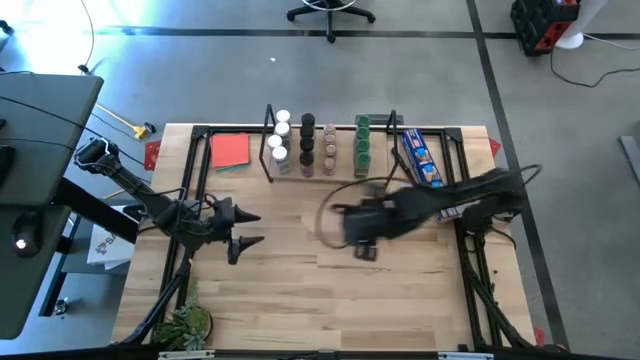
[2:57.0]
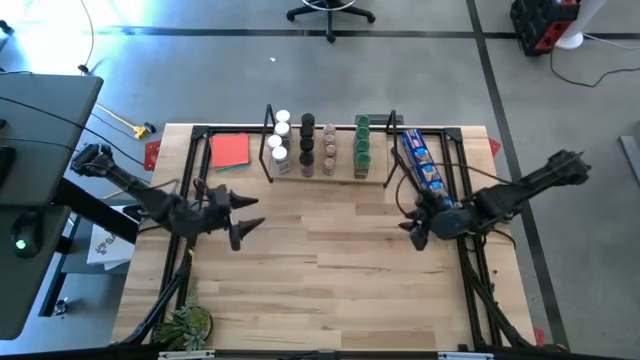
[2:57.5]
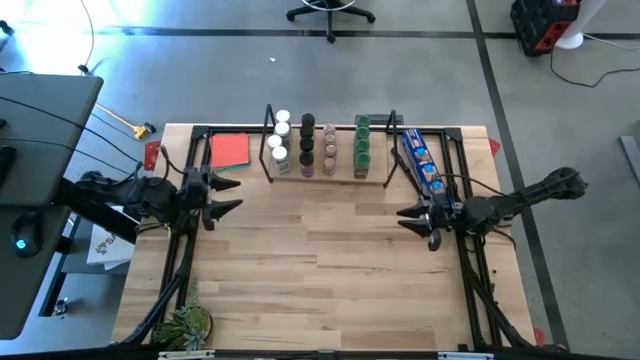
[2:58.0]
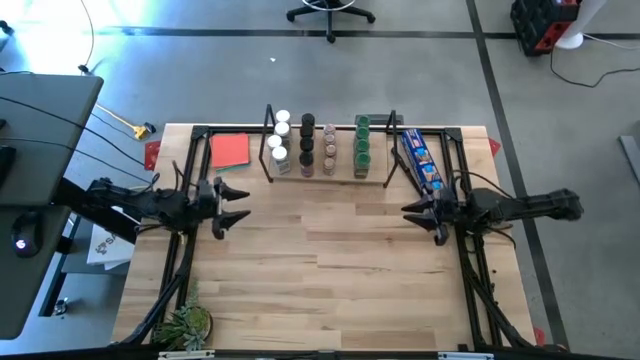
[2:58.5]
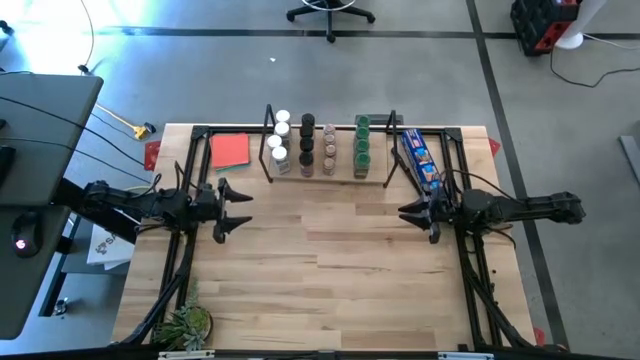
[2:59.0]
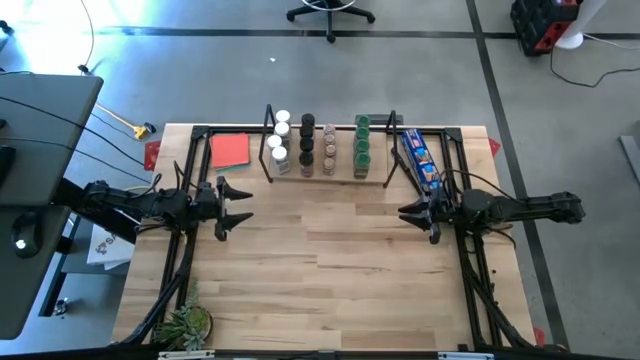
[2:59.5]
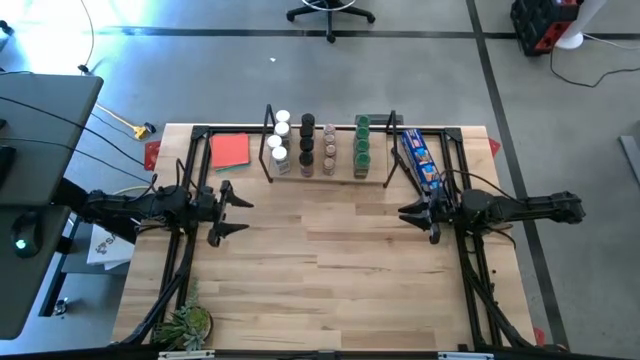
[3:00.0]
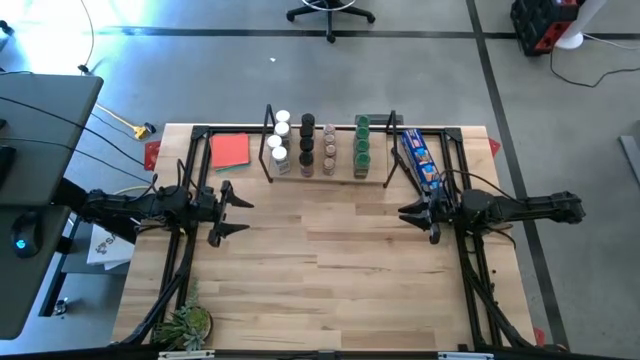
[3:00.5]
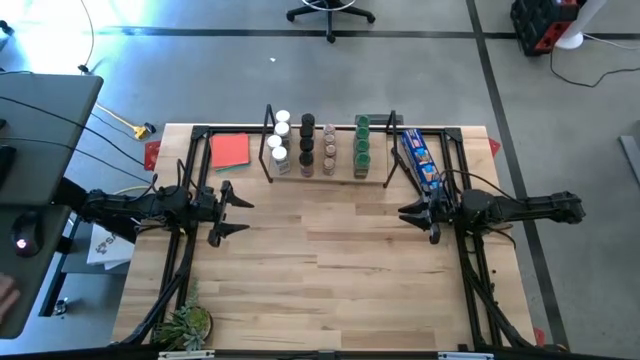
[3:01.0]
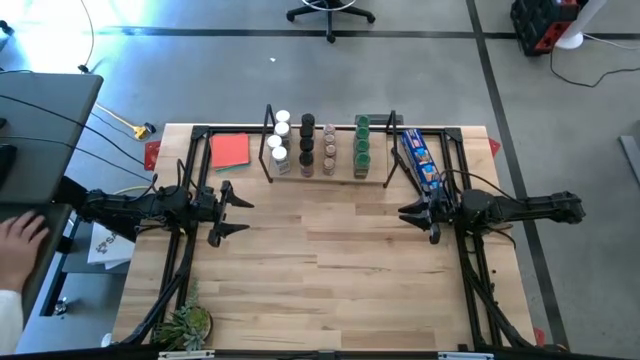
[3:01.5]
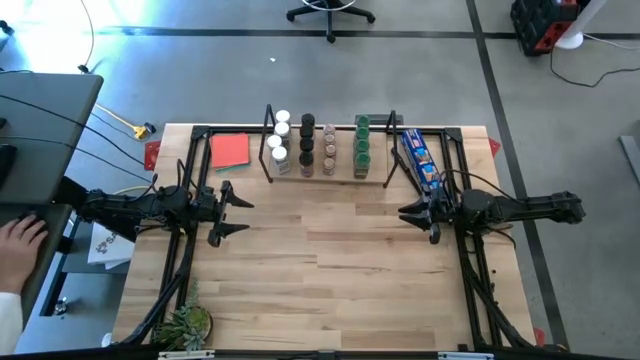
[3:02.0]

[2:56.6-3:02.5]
Task: Shelf spices
Return to Home Position

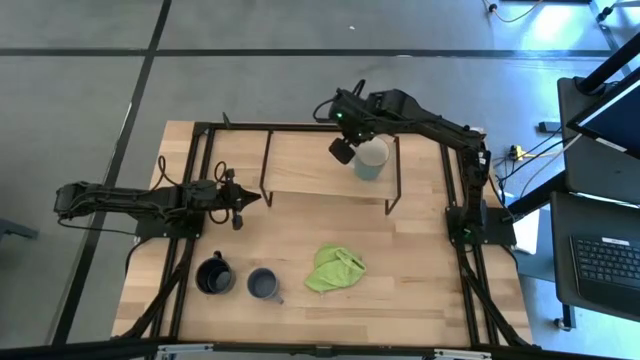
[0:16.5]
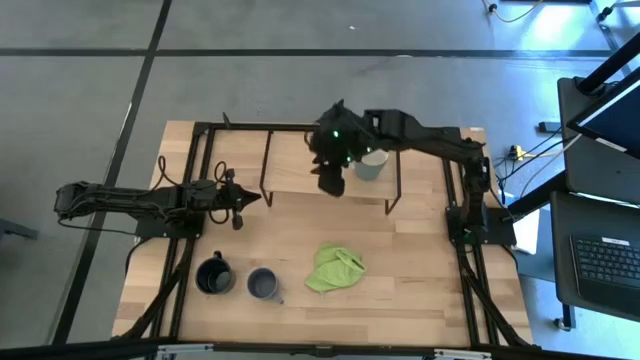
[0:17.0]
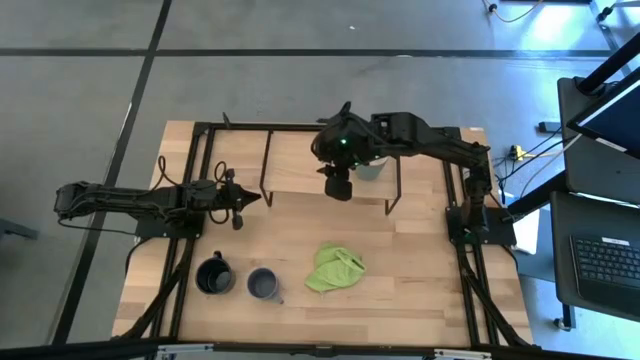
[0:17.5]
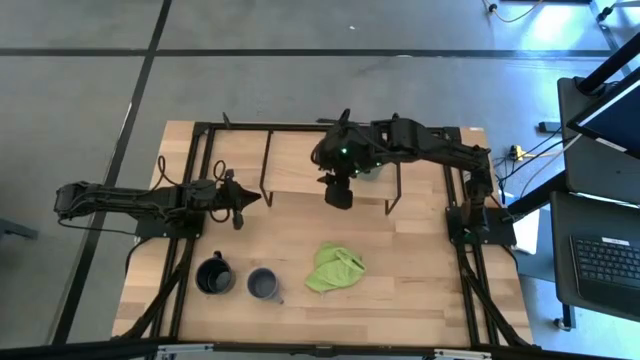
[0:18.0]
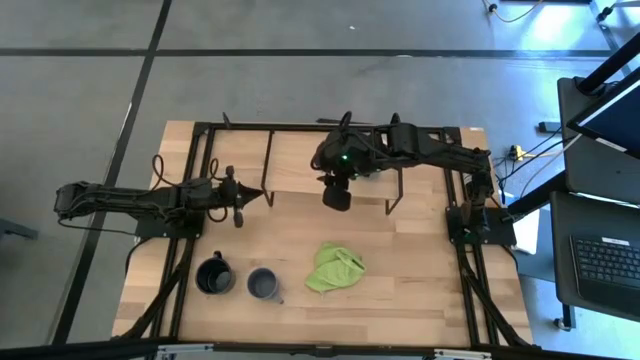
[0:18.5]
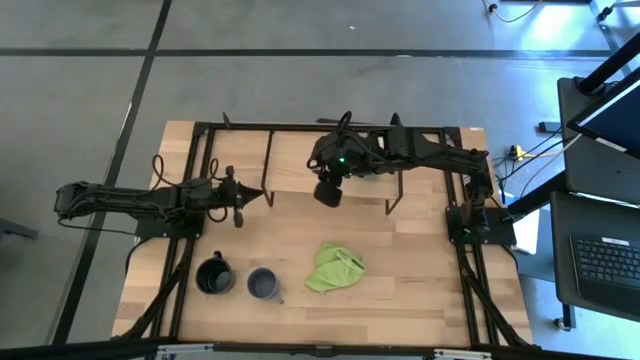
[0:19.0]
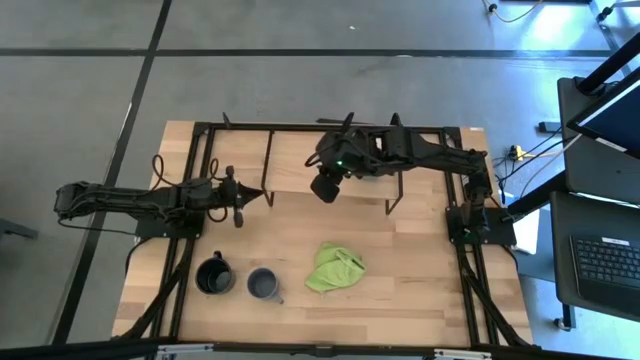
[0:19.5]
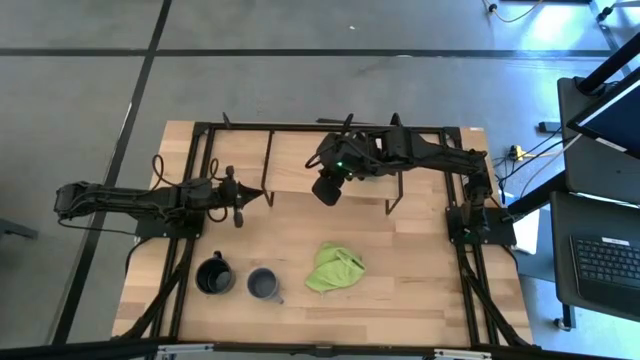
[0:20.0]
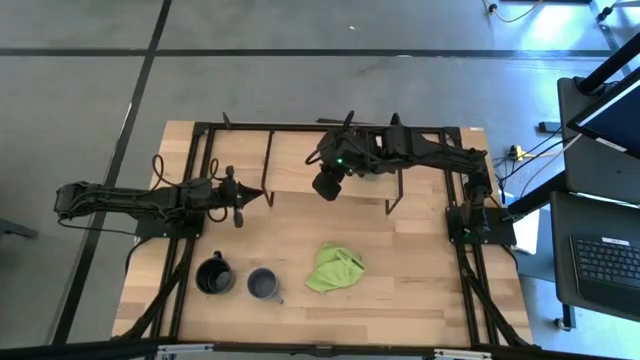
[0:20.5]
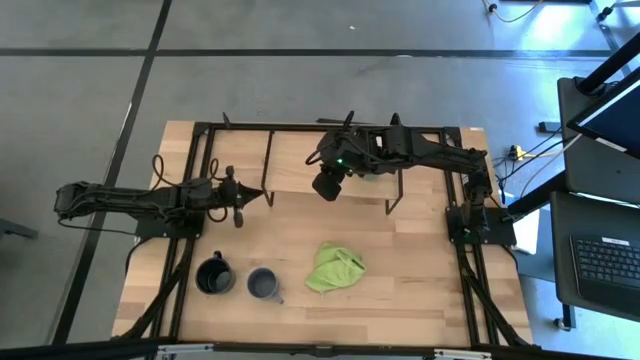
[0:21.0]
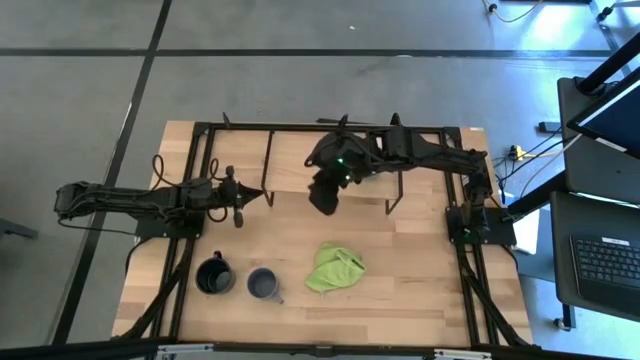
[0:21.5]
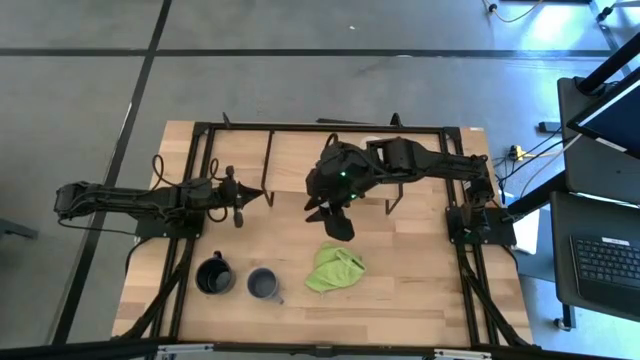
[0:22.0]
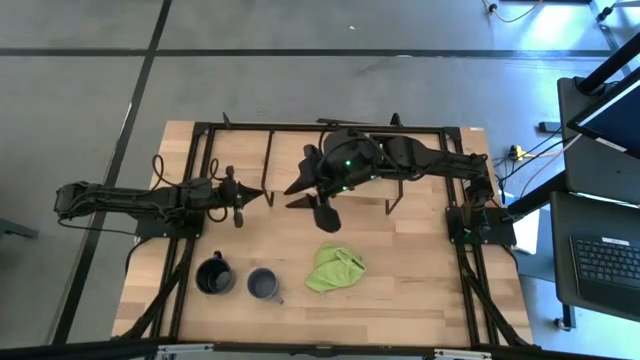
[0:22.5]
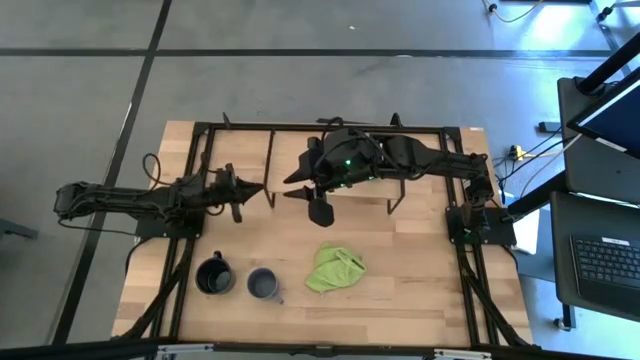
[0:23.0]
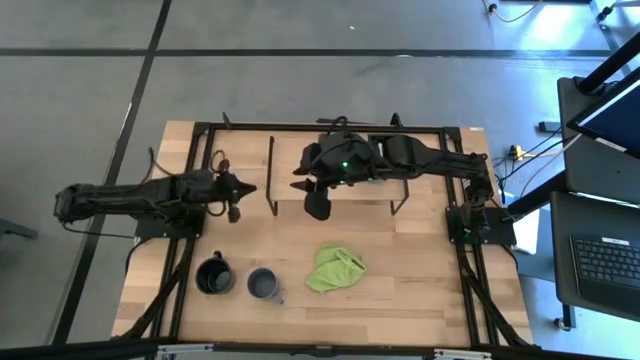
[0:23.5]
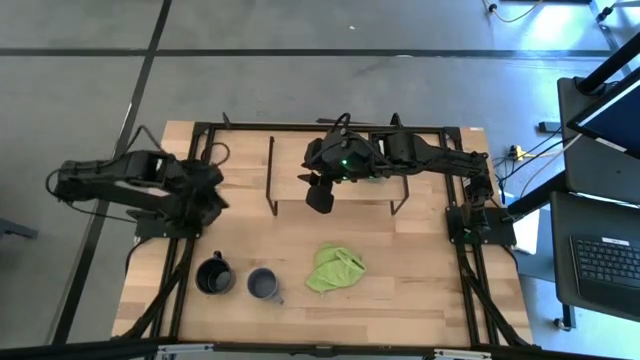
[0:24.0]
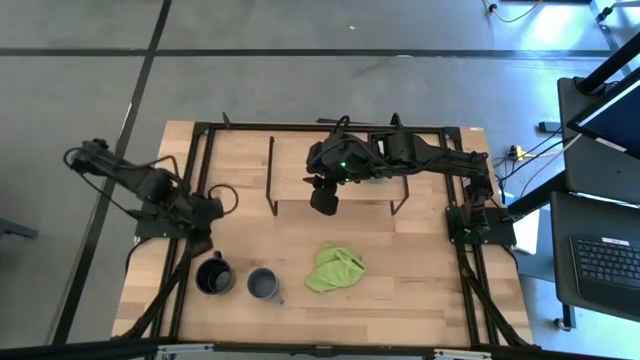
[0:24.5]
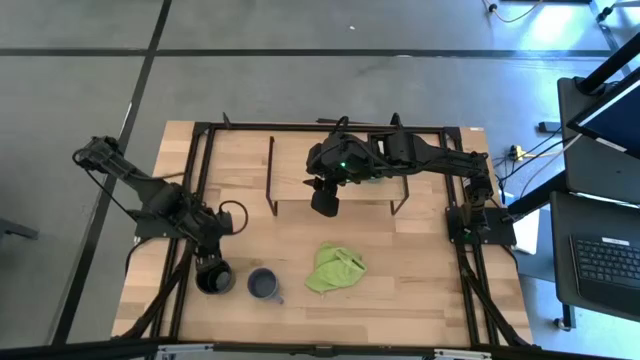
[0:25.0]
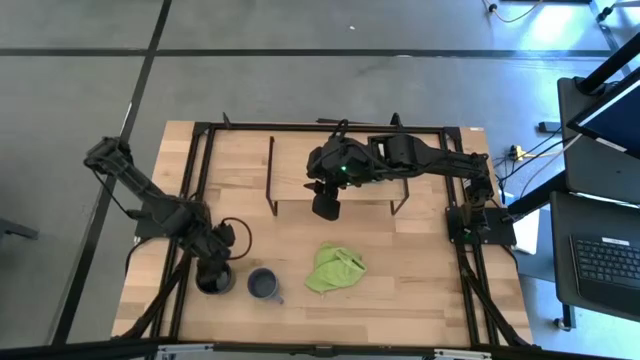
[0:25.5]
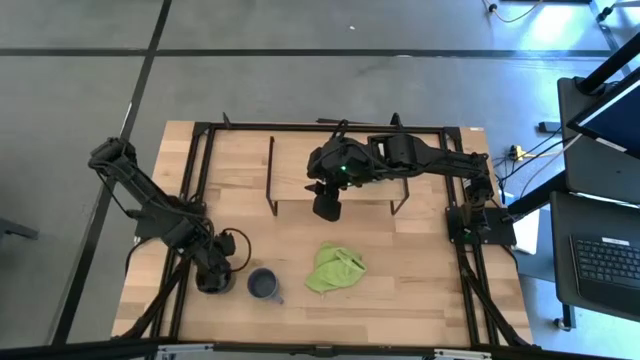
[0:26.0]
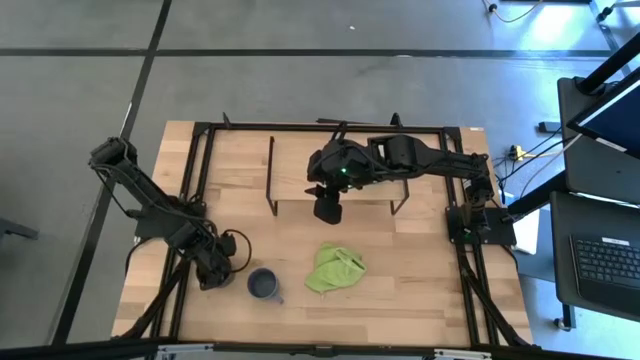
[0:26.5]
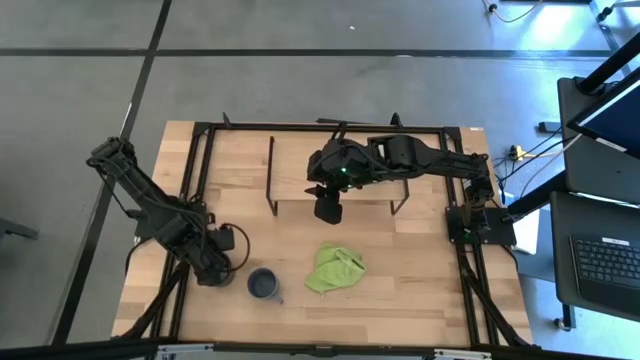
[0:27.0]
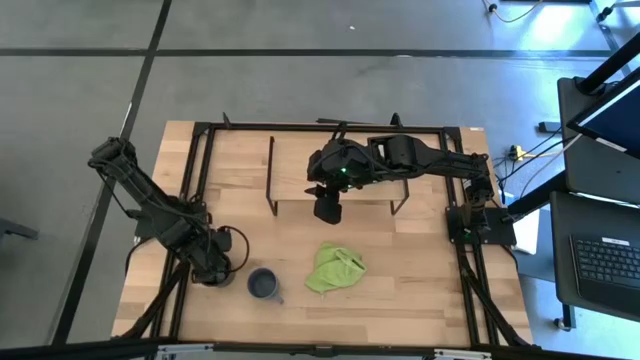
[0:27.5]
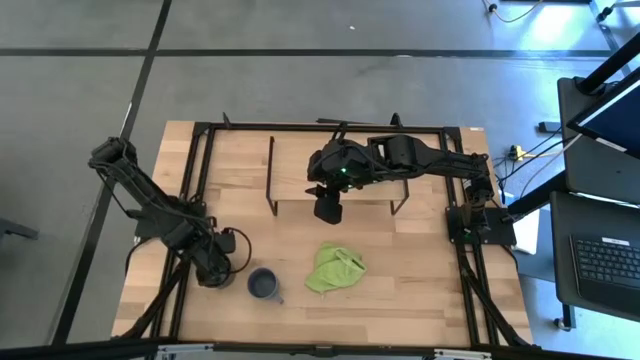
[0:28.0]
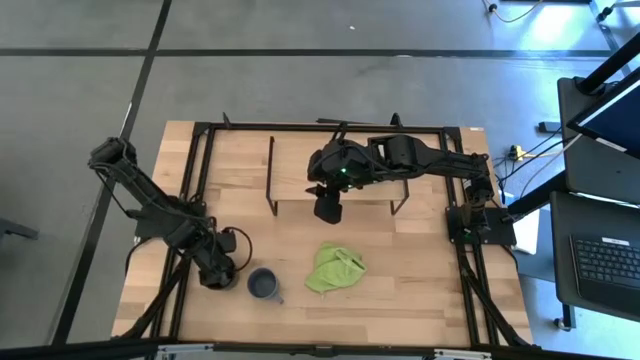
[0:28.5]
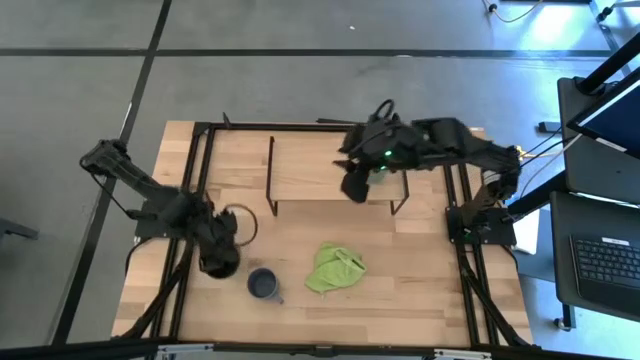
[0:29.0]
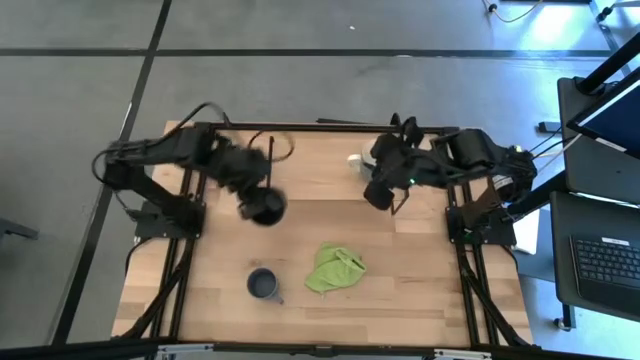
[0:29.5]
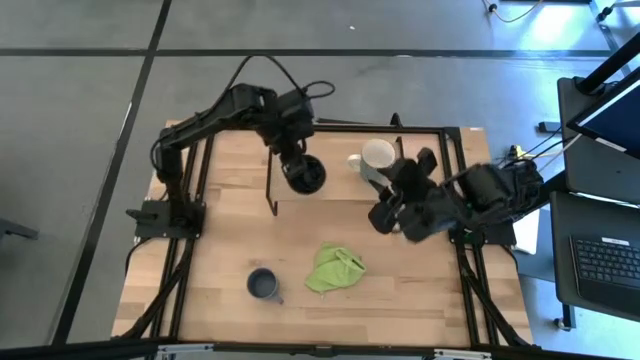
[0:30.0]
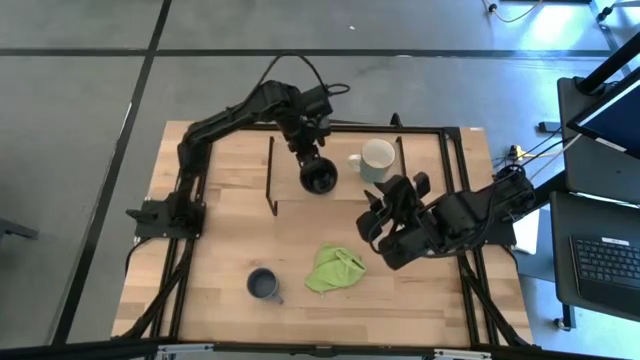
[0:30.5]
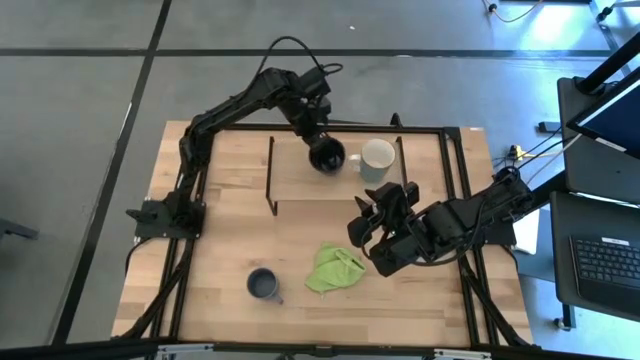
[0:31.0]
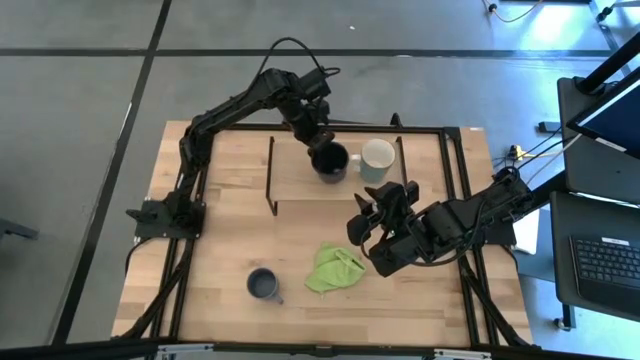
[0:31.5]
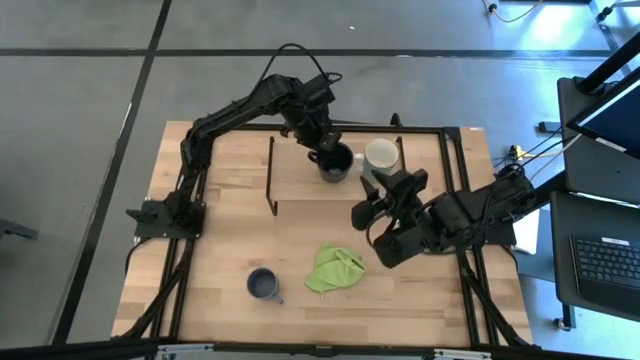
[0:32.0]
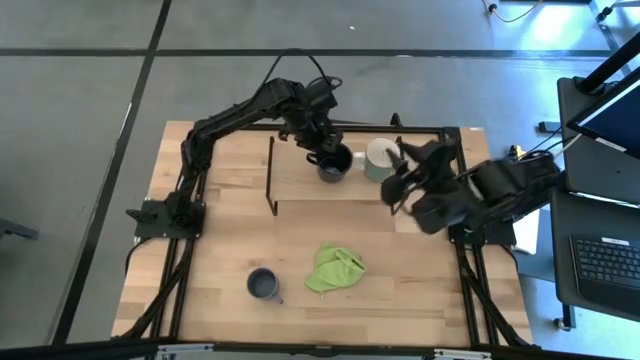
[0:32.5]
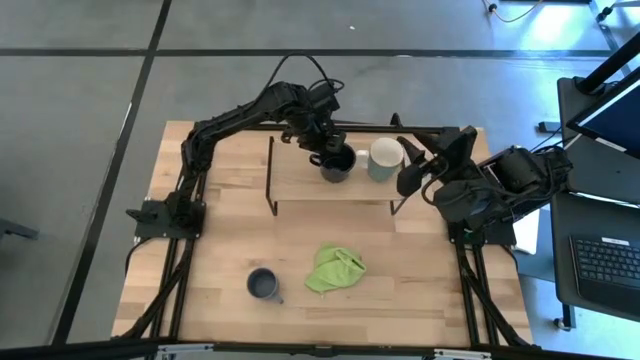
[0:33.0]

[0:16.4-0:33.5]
Task: Stack small to large cups/mugs on shelf
Put the dark blue mug on the shelf
